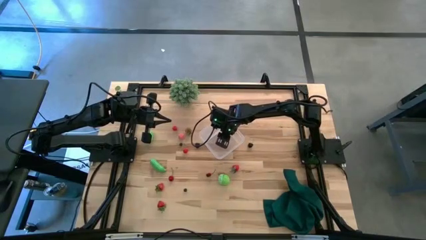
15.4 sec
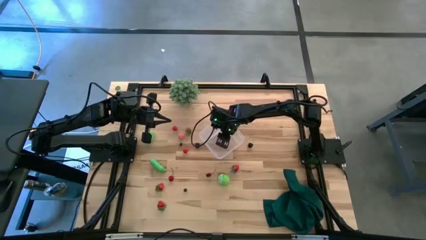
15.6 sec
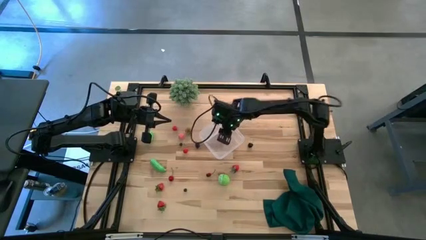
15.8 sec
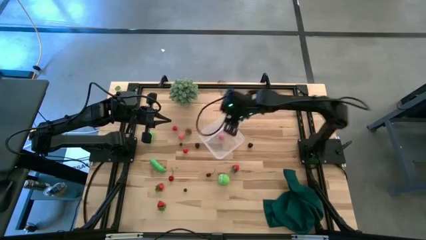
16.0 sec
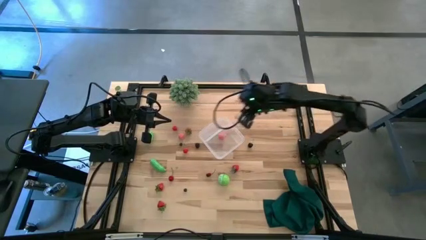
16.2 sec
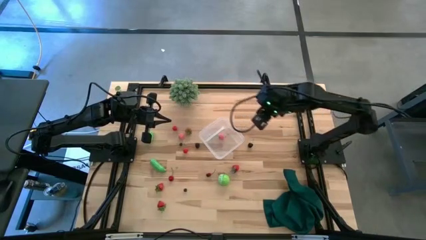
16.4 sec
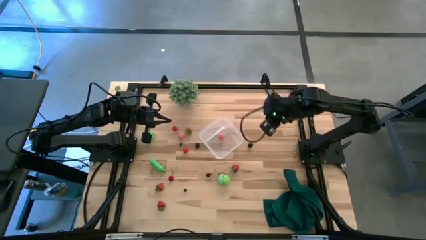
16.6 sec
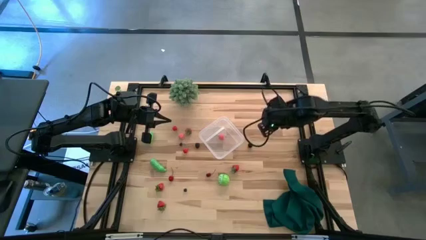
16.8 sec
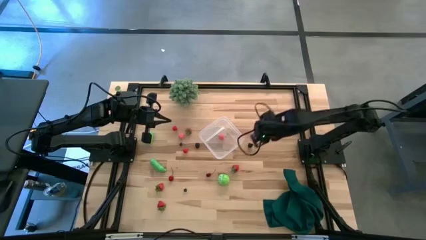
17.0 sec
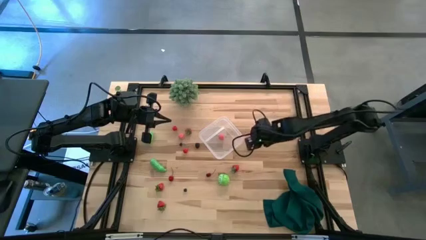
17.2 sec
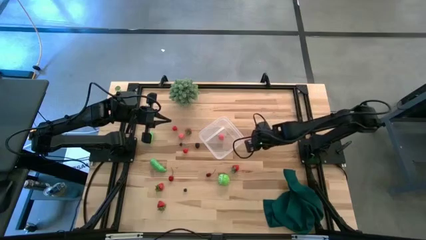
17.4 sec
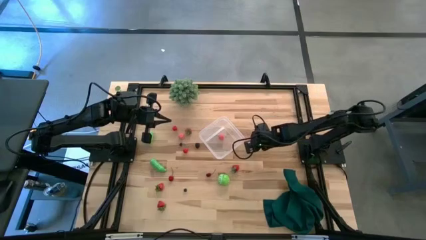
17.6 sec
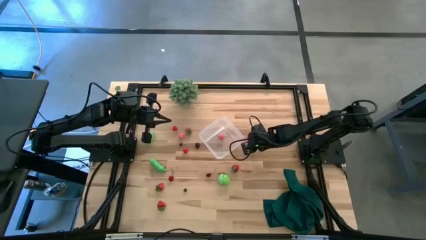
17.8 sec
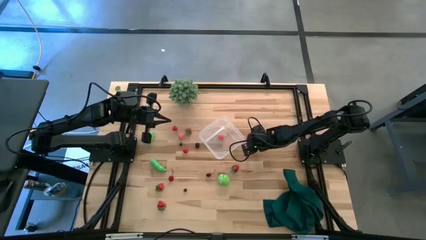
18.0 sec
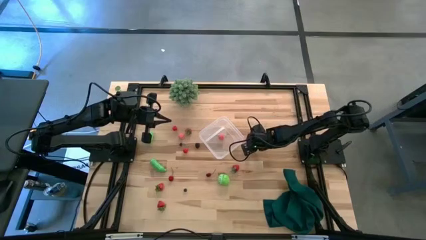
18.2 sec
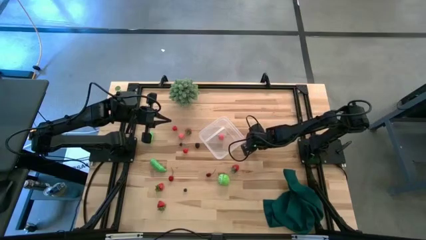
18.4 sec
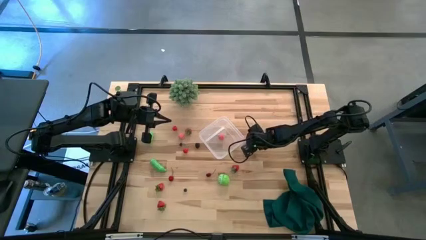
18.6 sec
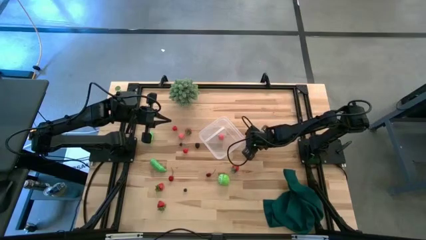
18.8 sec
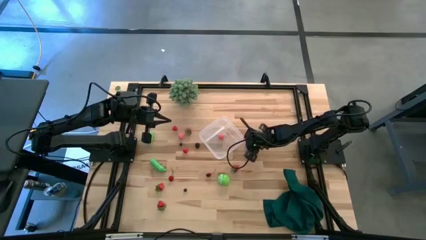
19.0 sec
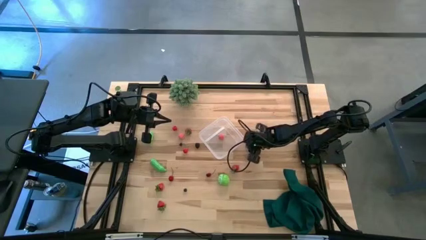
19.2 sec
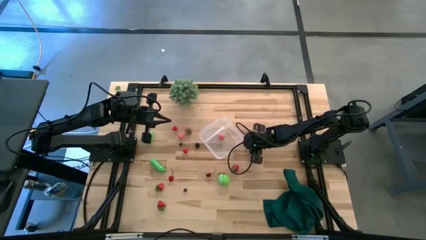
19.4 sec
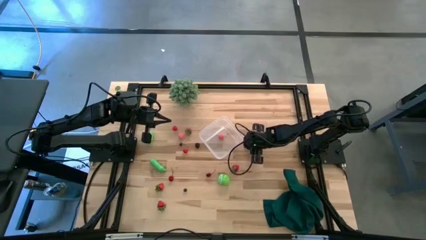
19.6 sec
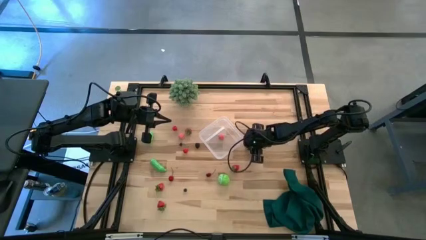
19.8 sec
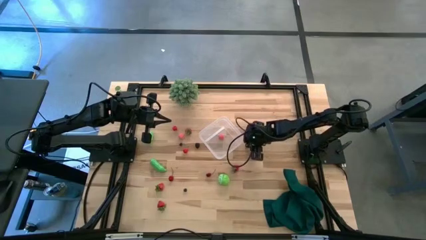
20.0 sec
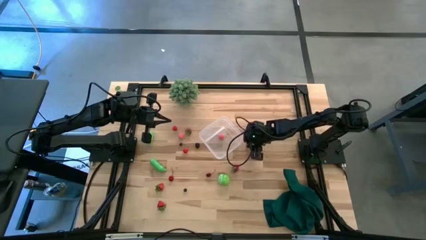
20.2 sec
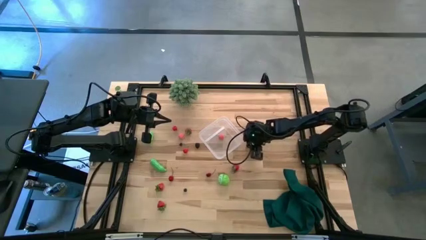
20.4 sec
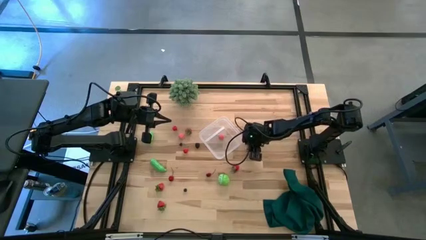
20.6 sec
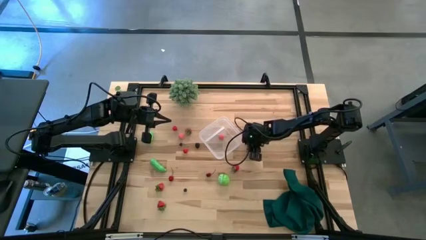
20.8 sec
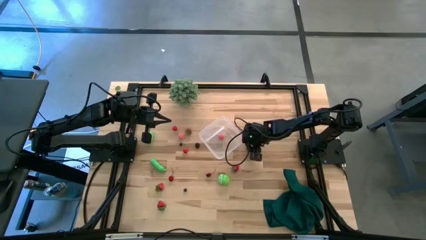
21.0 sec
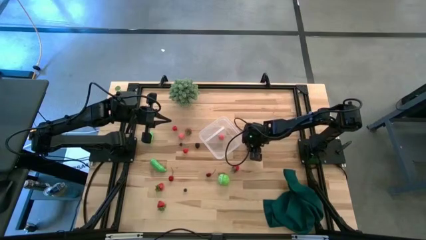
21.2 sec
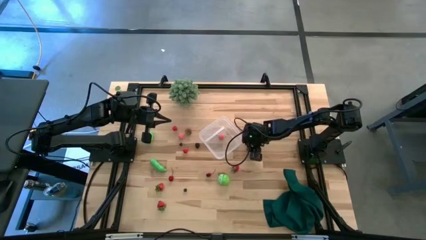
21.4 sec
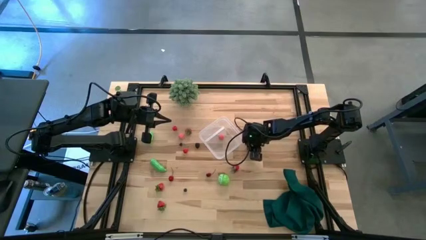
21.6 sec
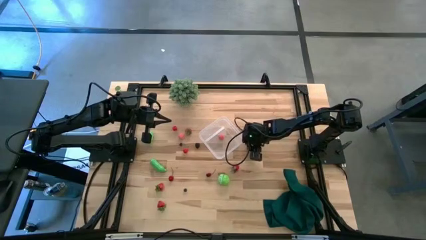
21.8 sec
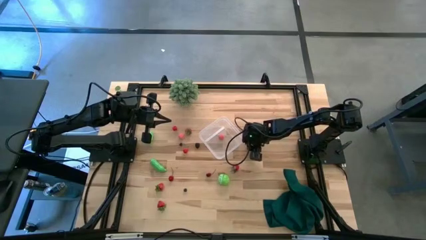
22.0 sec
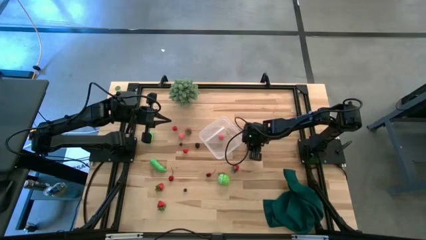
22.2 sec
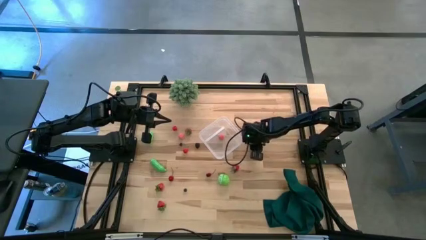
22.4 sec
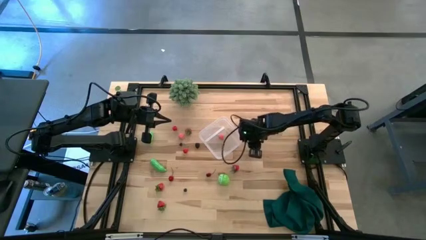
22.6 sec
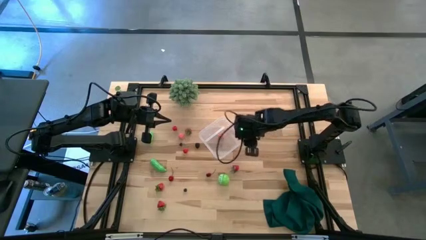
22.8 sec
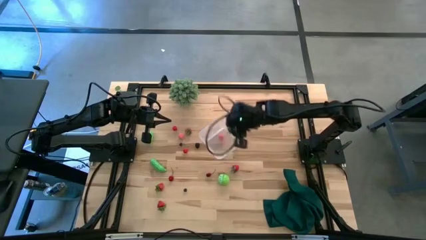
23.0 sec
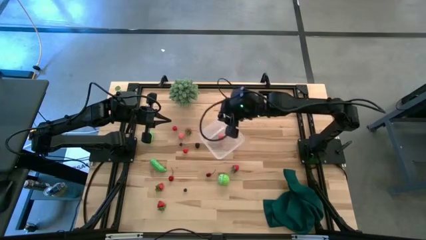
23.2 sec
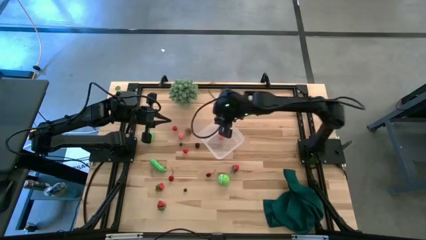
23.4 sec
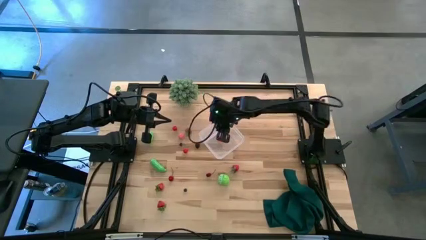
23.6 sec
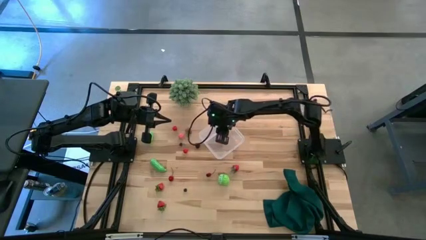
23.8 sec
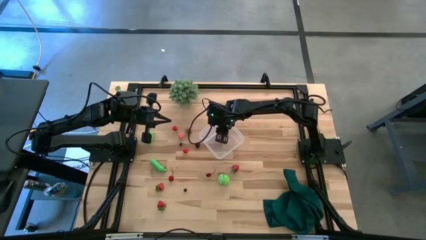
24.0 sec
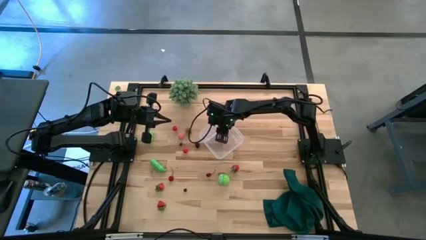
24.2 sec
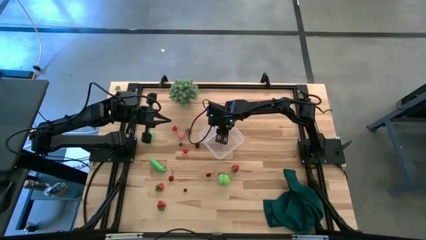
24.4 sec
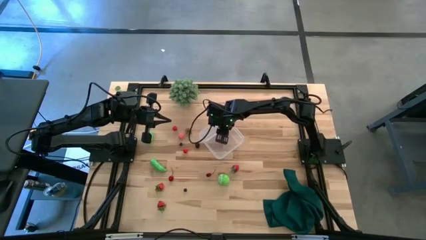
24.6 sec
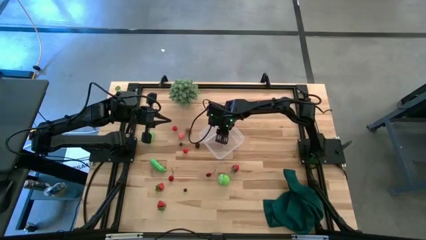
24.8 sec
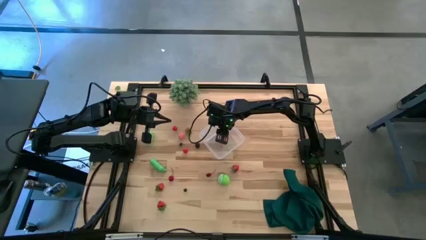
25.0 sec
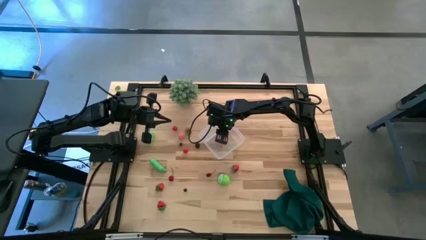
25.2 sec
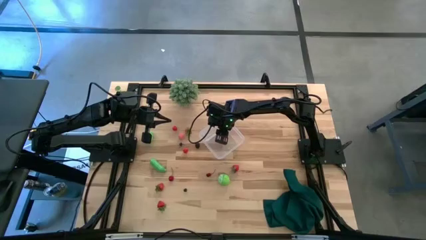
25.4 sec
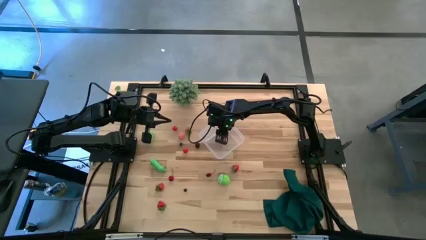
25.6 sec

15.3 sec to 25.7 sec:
Task: Pick and placing Produce into tupperware
Put the black cherry into the transparent bin

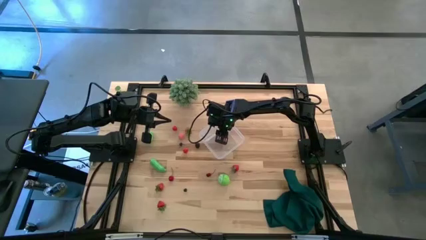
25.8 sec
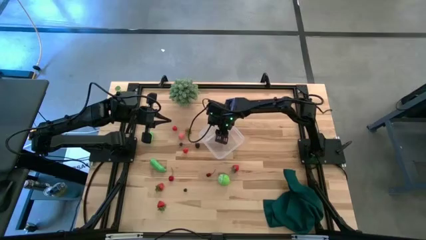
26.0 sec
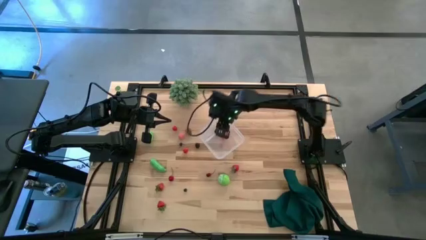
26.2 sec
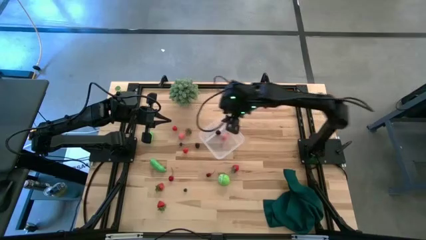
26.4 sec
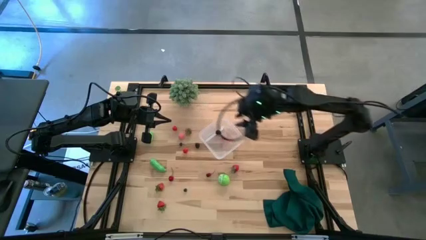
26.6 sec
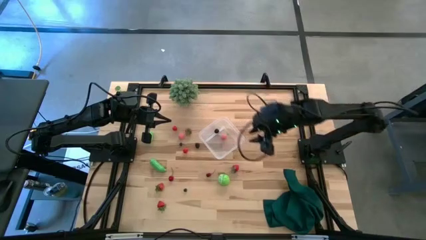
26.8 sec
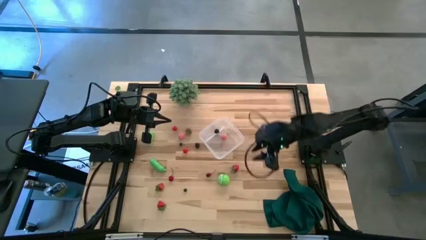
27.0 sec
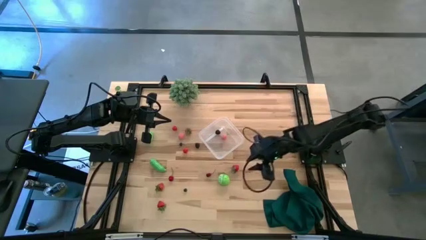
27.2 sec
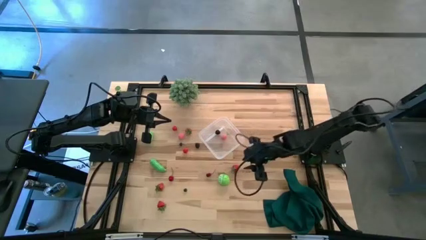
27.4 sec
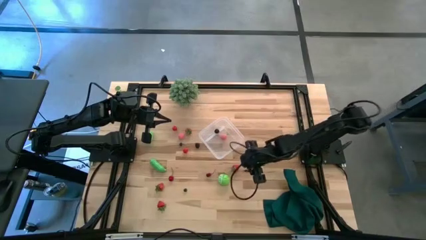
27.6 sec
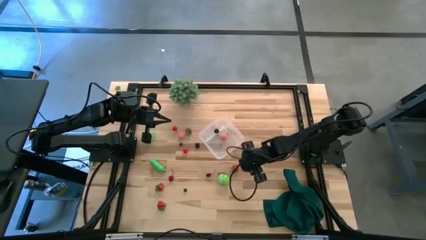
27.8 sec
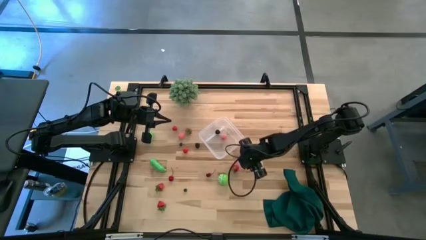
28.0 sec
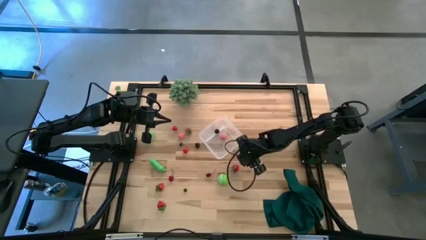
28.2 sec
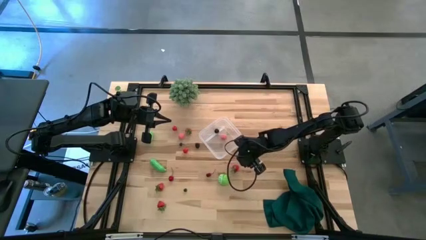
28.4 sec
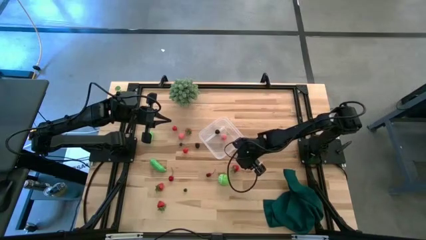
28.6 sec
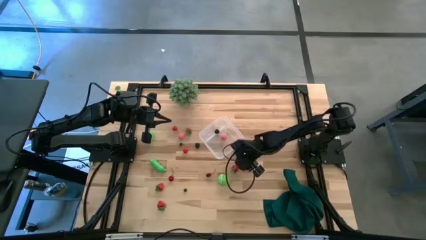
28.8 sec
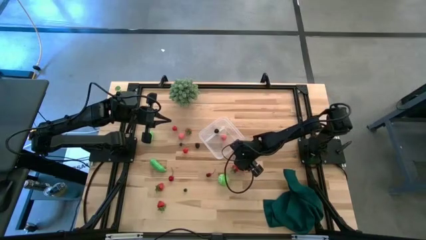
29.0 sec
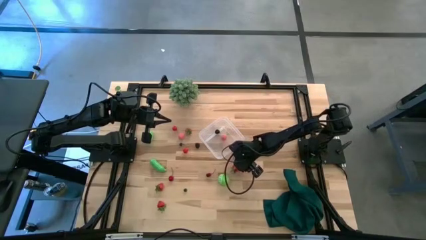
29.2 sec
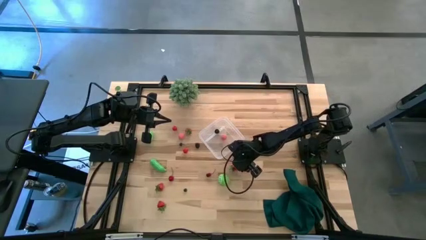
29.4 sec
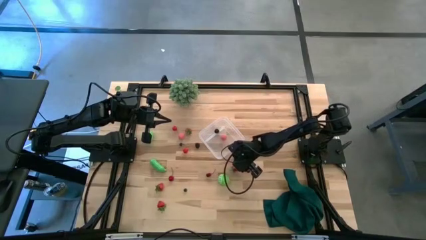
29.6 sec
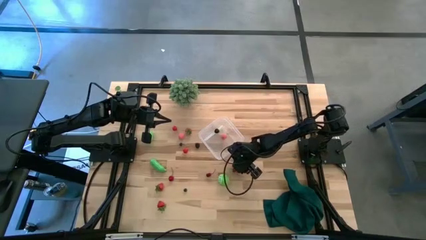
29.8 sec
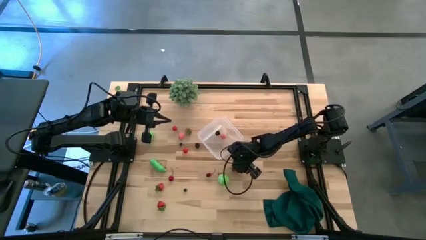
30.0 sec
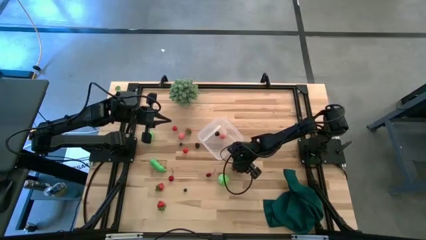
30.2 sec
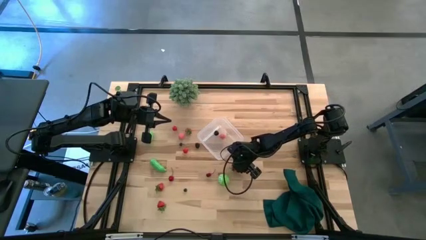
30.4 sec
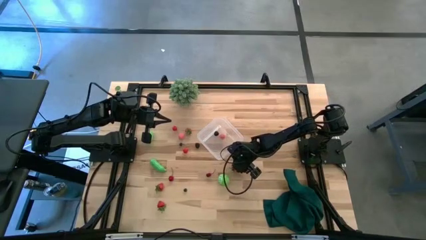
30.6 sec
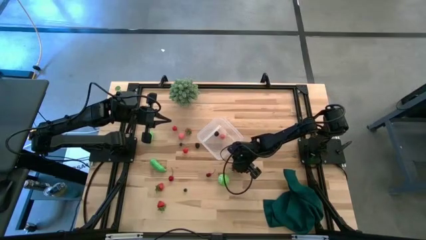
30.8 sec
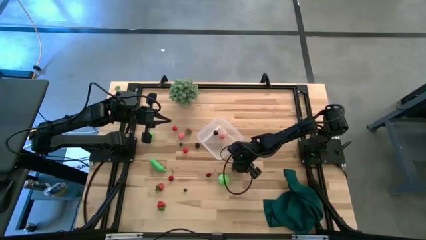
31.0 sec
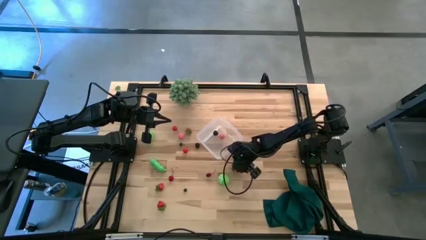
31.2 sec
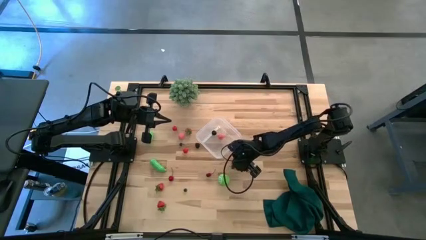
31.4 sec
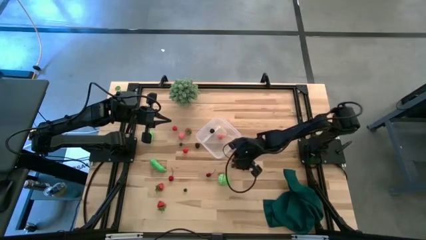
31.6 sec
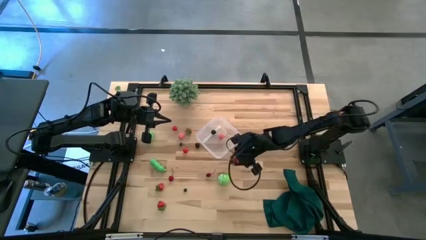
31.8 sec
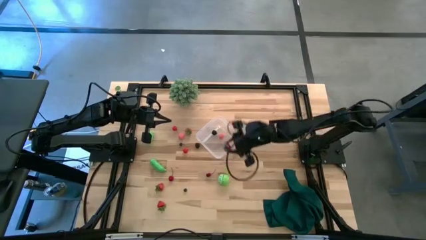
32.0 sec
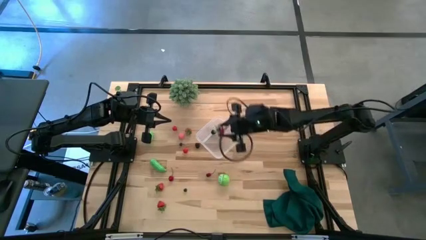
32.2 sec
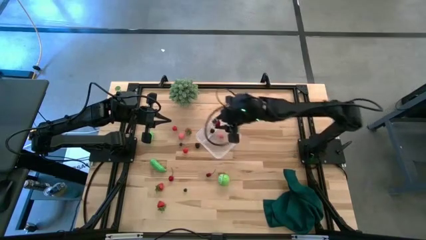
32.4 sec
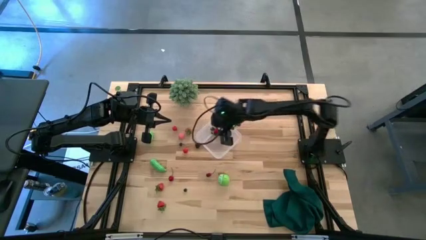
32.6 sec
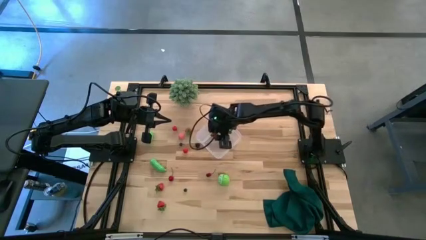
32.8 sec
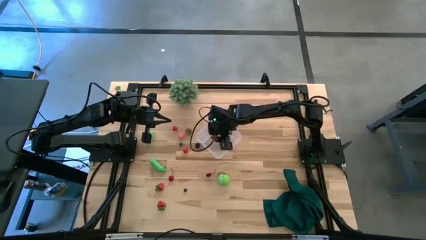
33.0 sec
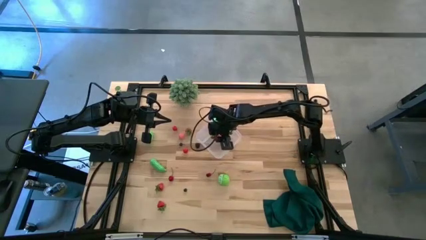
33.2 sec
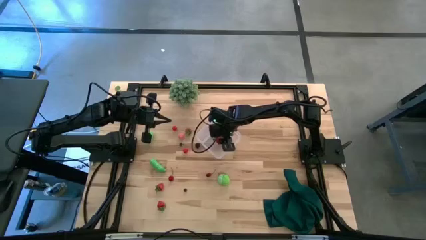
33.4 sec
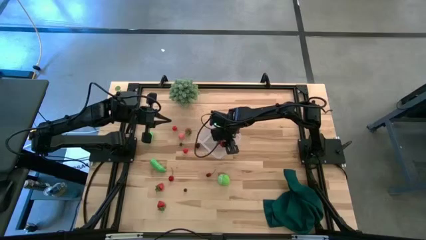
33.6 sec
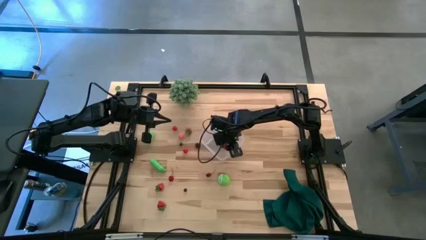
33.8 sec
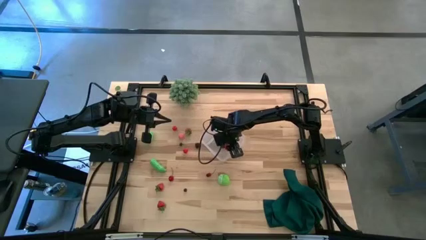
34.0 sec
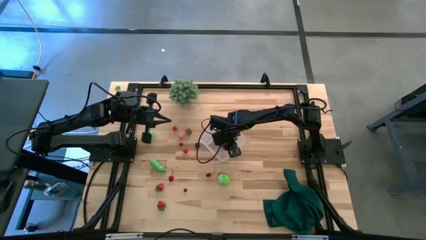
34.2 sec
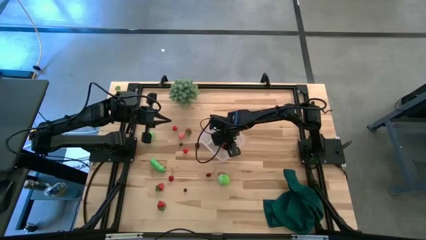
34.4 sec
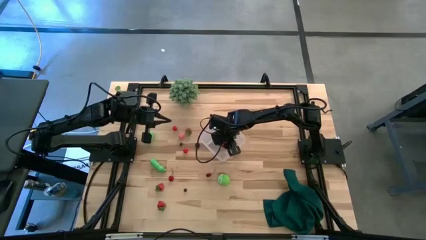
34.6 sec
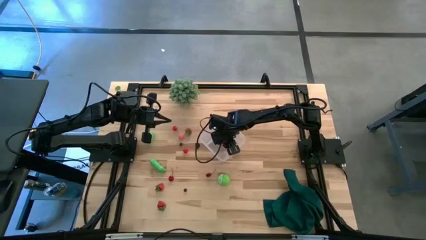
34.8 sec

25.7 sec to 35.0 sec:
Put the red strawberry into the transparent bin
